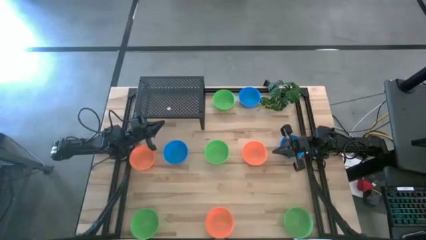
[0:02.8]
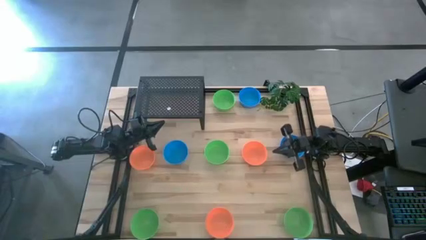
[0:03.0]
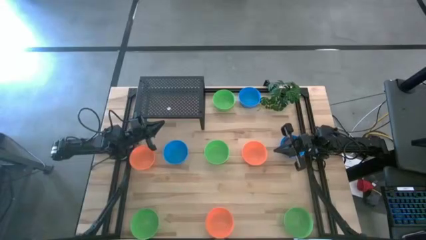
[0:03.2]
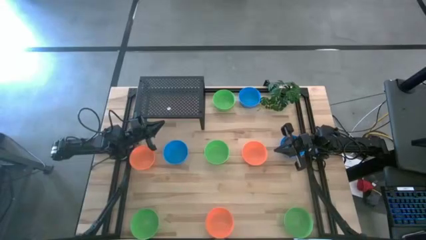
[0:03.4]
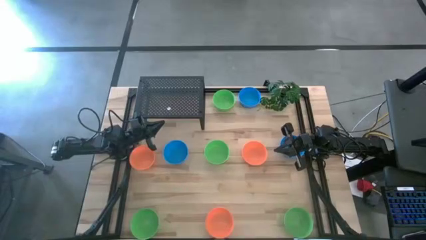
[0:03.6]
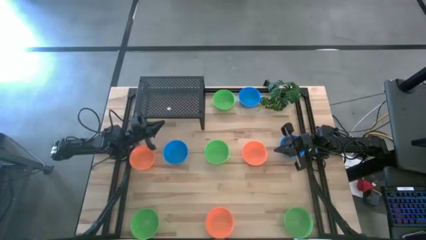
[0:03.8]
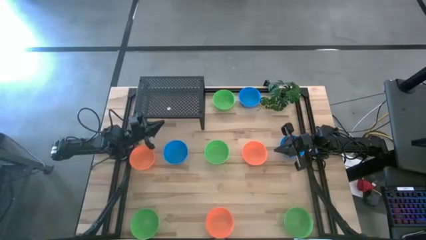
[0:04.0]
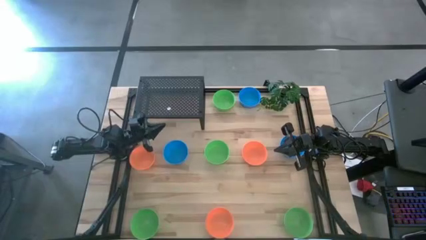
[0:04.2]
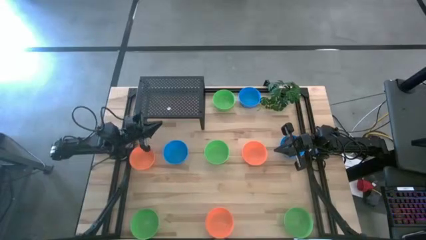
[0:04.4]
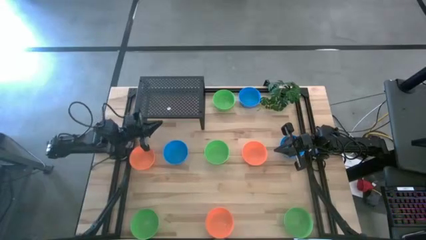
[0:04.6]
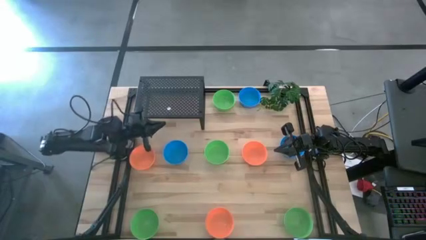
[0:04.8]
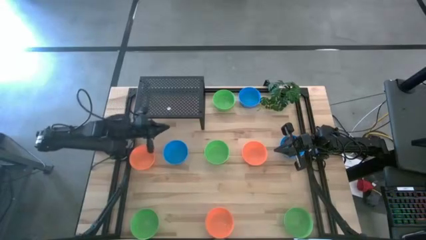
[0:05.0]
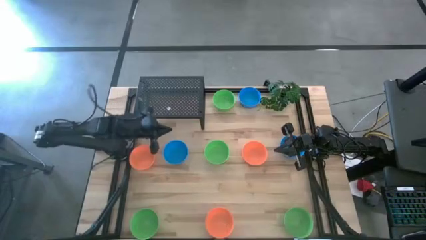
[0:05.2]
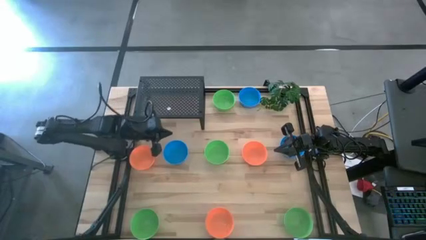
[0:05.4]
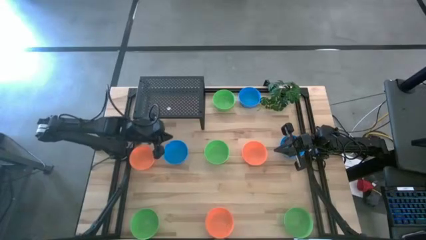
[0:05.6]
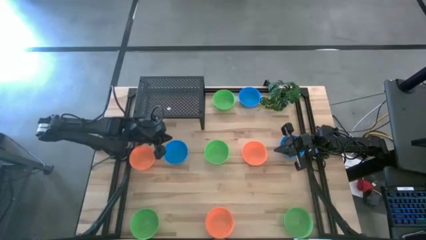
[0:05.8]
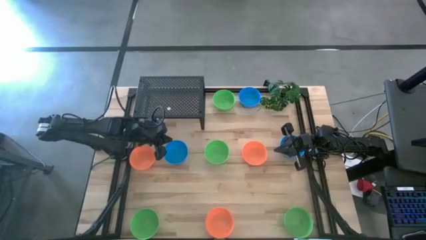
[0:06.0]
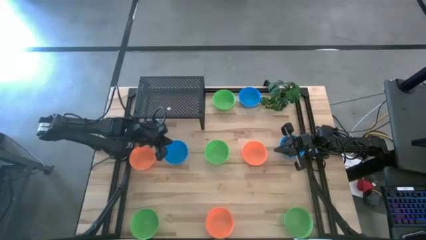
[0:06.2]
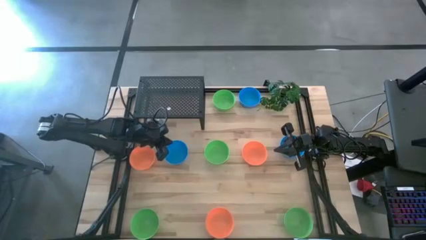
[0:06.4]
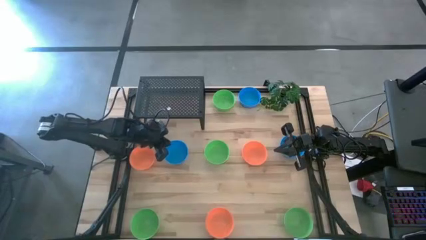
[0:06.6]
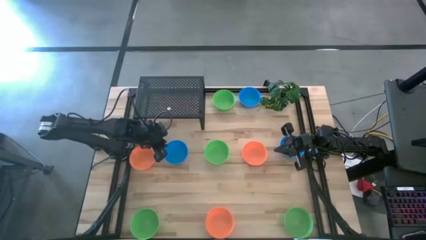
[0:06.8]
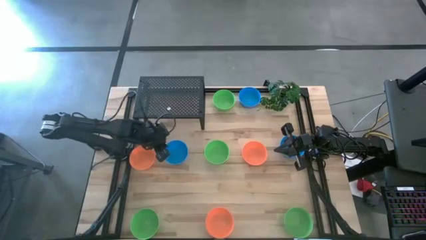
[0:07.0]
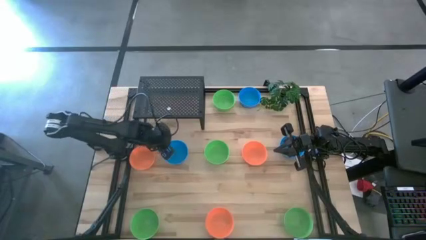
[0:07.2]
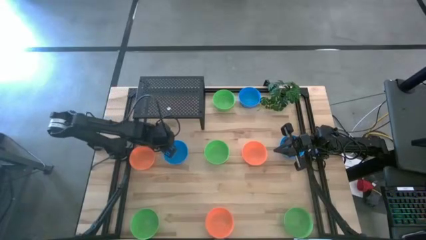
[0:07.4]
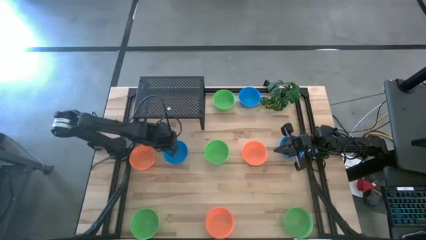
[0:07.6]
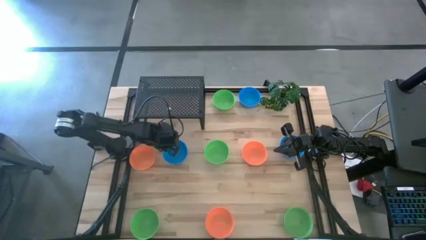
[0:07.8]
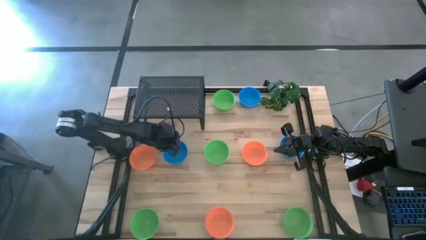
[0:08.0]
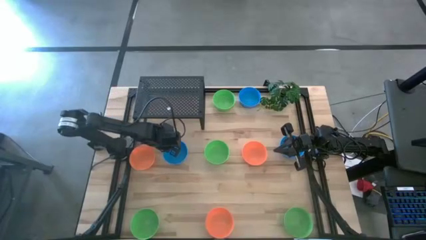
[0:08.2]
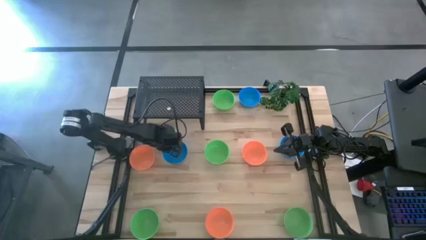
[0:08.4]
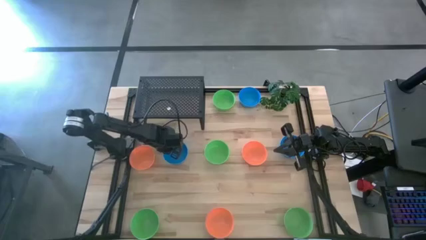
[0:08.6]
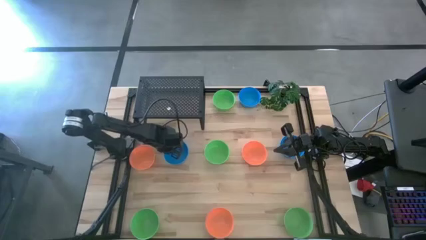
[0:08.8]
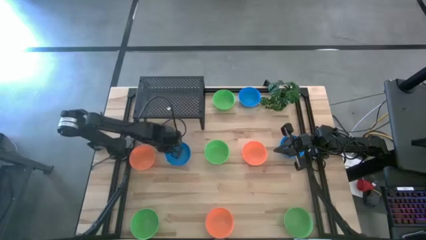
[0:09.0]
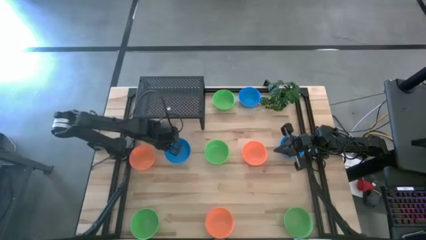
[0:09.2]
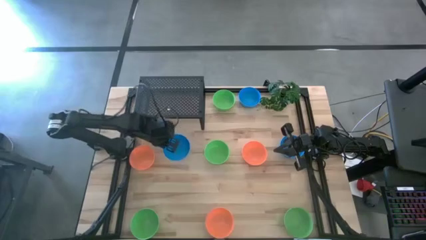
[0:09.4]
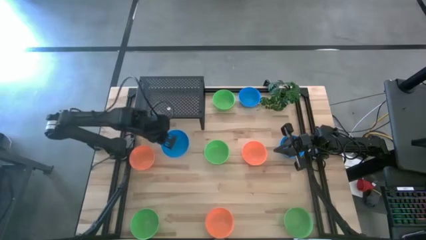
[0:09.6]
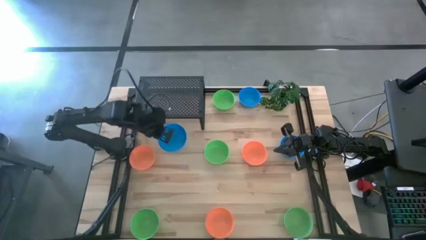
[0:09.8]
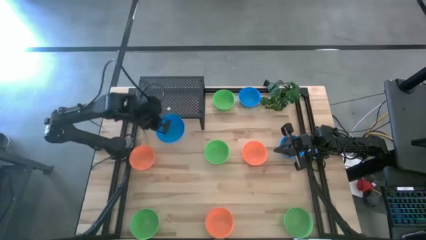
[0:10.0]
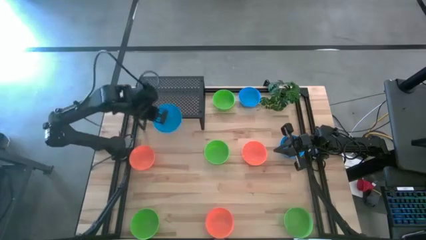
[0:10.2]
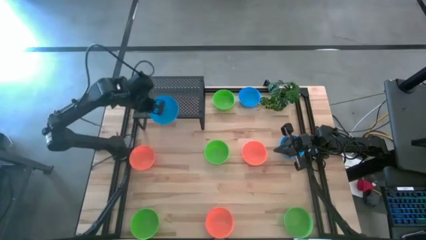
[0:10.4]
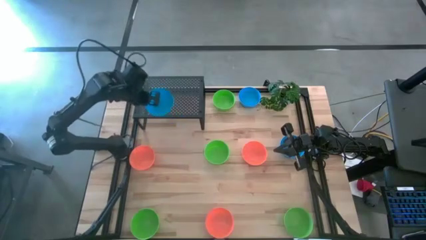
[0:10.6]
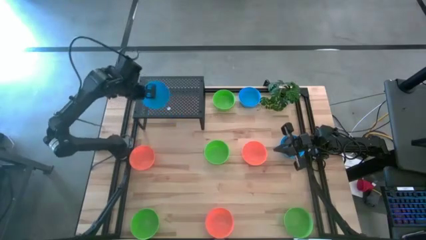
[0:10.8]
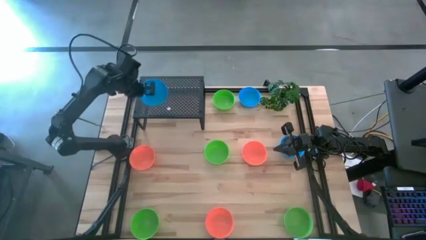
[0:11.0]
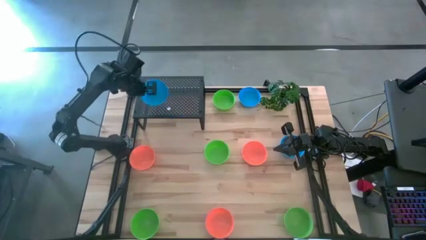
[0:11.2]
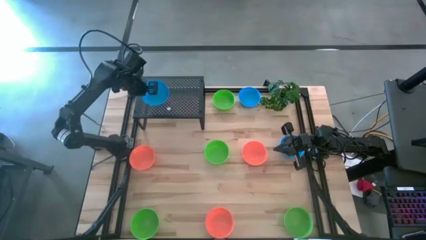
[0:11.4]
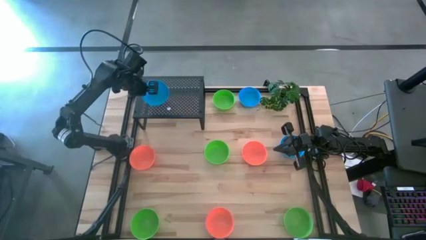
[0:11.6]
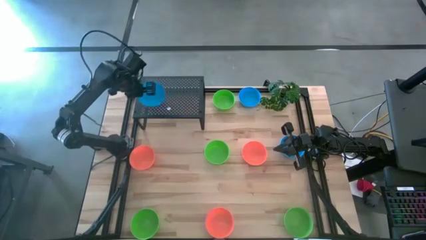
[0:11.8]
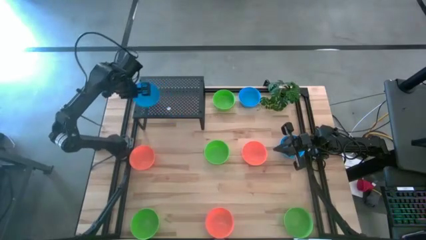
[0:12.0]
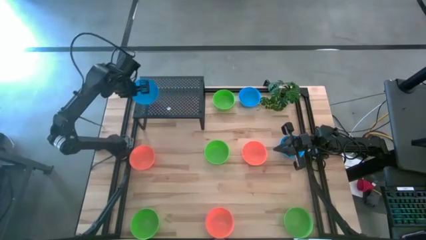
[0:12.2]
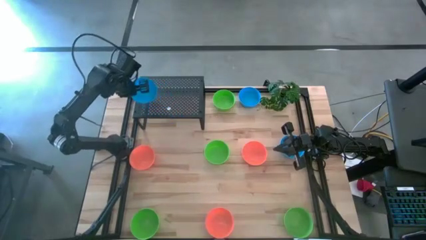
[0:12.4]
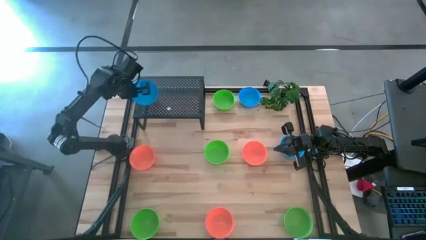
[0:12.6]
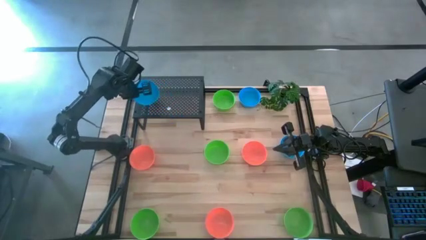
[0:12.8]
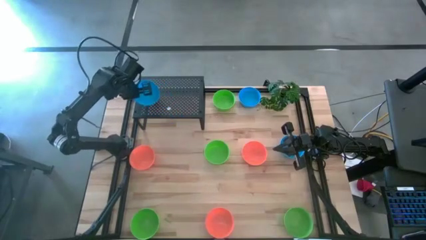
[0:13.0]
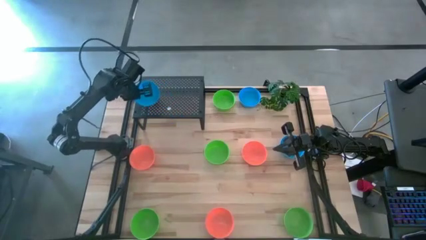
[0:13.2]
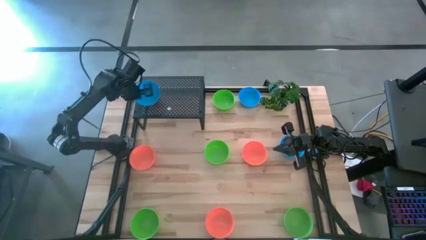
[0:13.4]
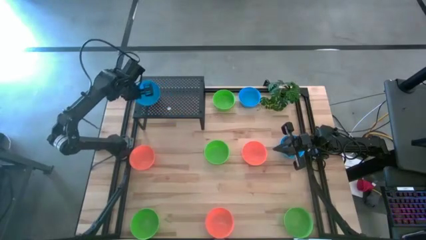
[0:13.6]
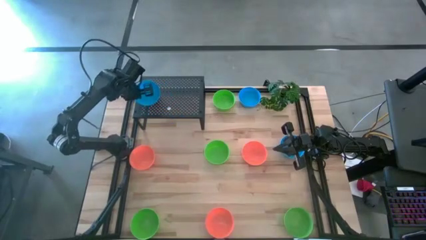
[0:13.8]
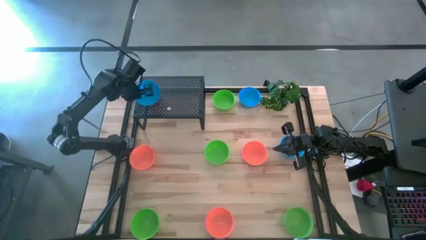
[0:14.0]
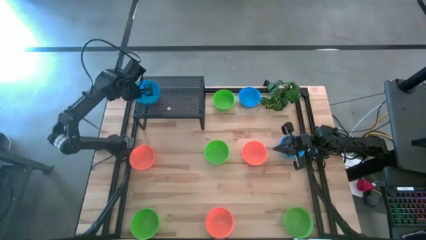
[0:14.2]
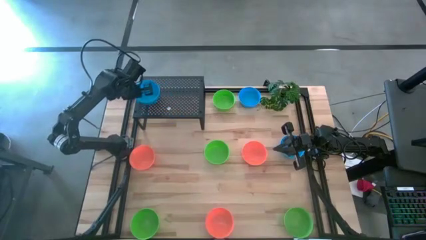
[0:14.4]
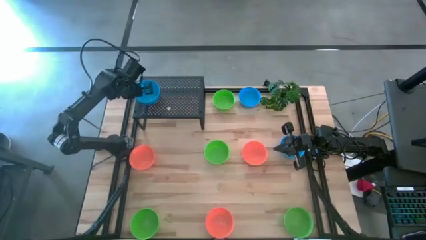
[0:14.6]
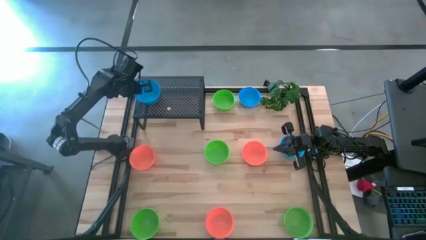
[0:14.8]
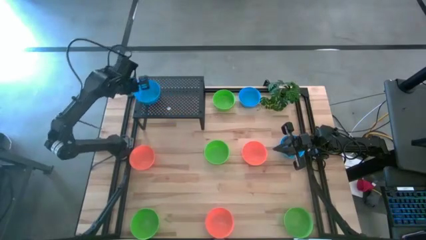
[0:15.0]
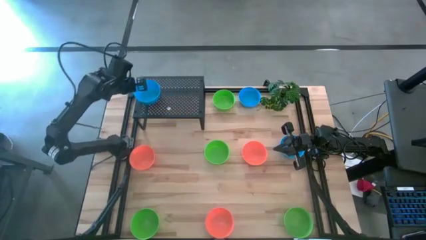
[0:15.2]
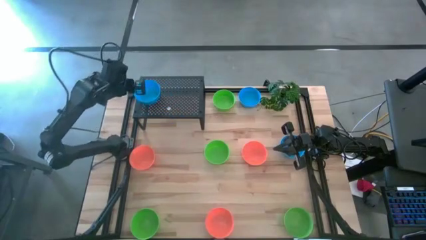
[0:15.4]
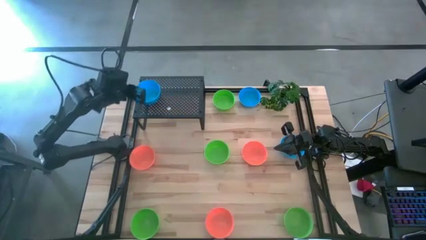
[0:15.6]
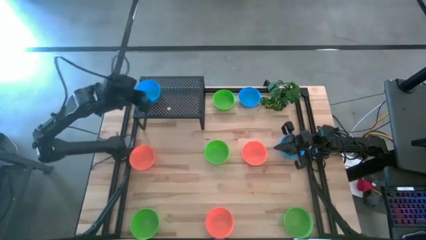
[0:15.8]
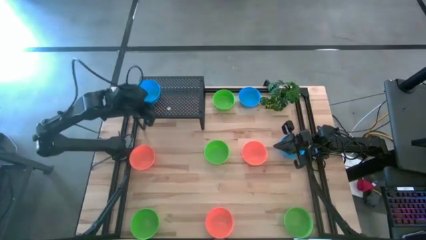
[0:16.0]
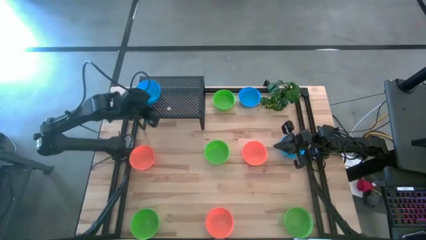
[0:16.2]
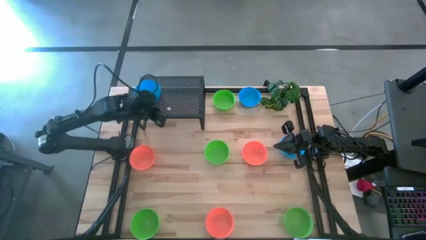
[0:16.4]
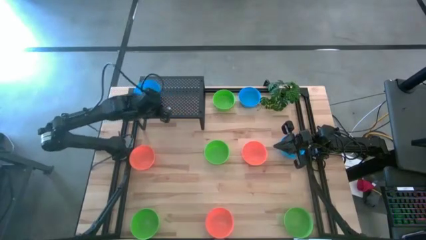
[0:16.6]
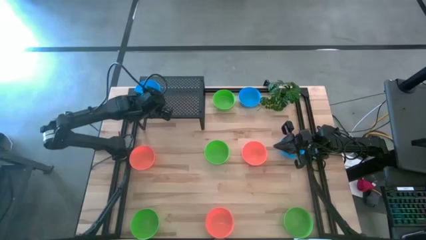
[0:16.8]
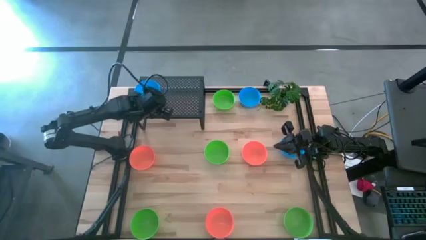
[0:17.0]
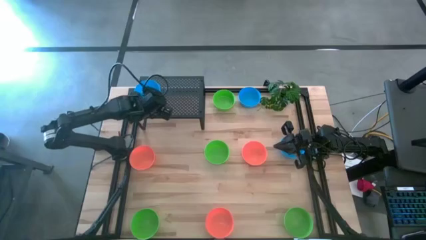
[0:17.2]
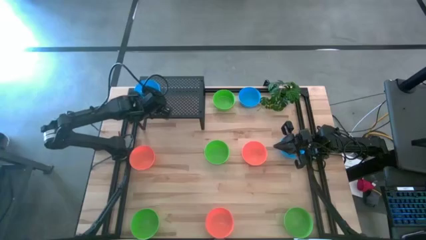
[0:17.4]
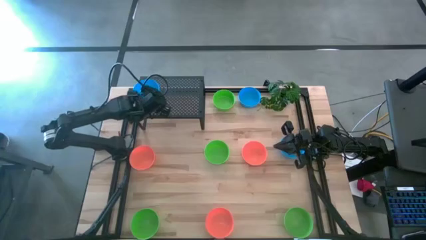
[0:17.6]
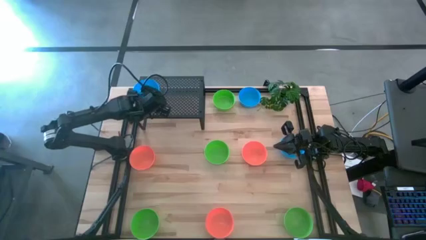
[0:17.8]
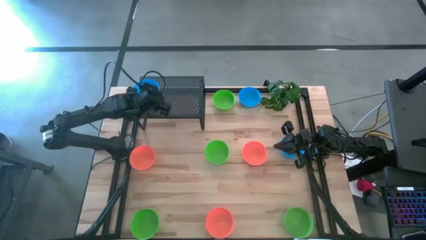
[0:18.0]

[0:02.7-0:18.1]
Task: Pick & Place Mini bowls
Put the blue bowl on the shelf
